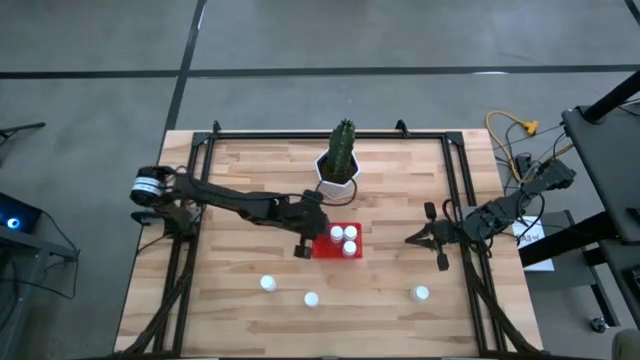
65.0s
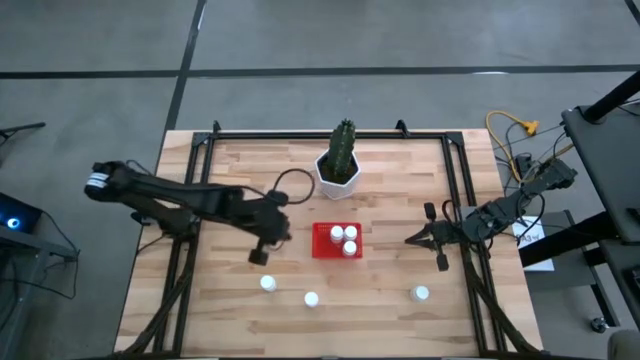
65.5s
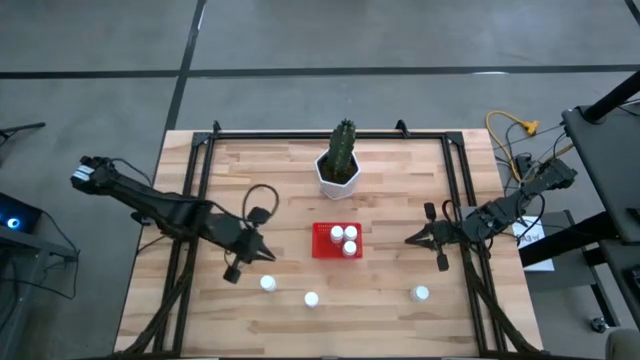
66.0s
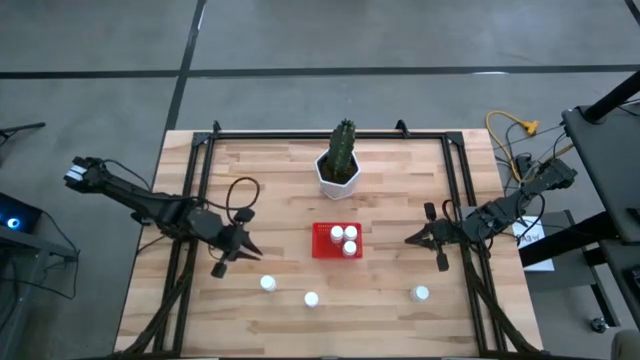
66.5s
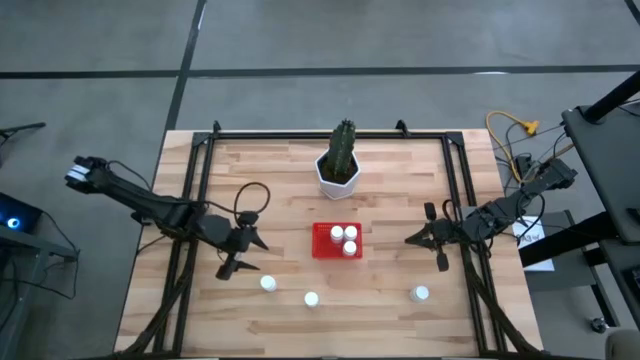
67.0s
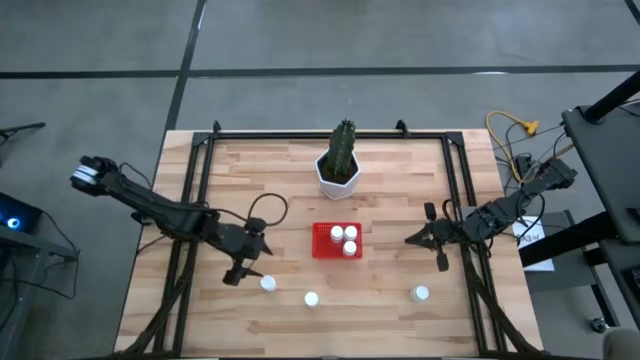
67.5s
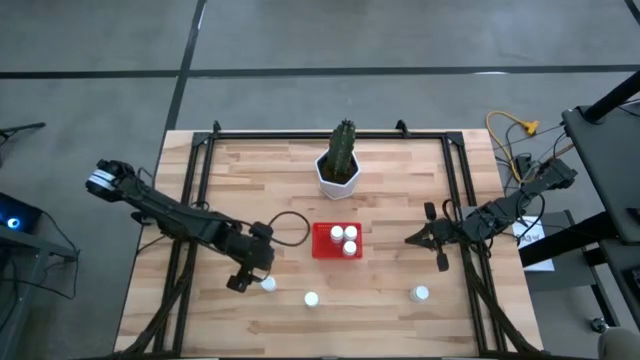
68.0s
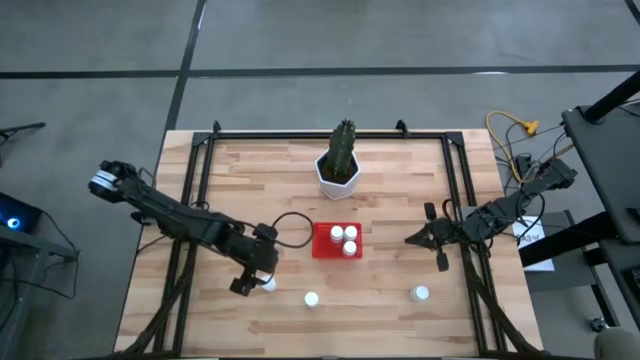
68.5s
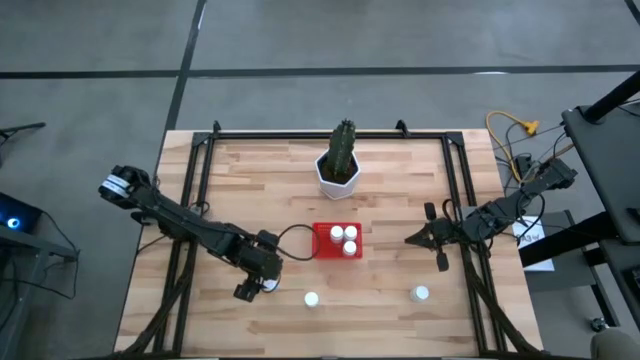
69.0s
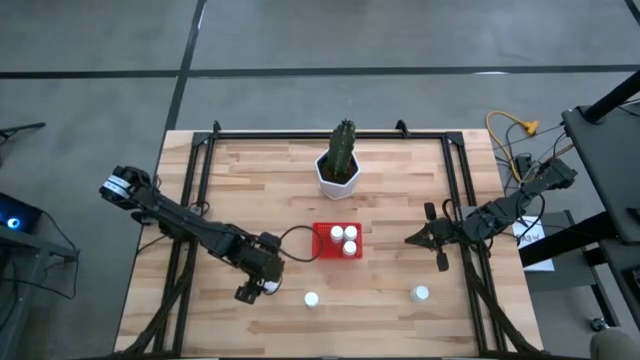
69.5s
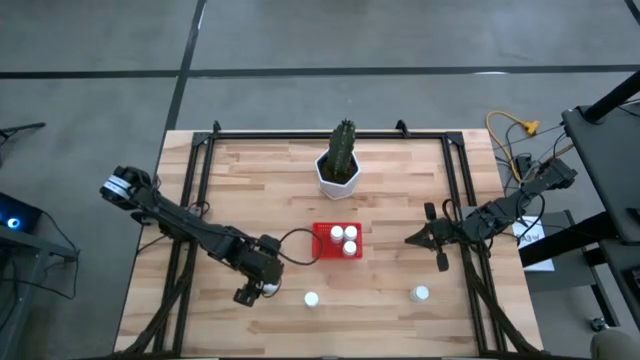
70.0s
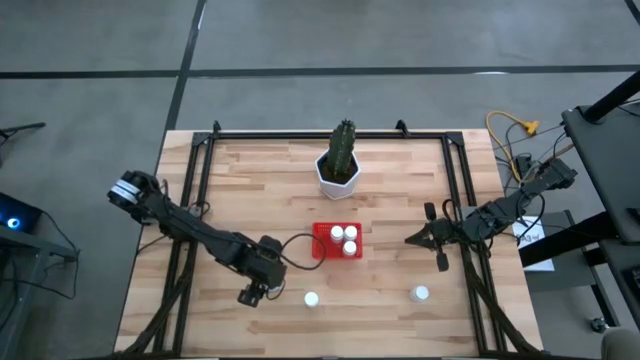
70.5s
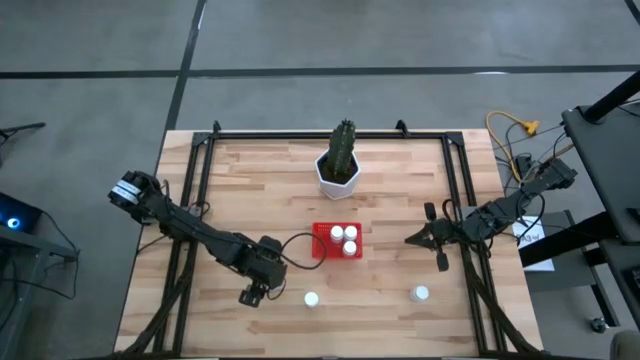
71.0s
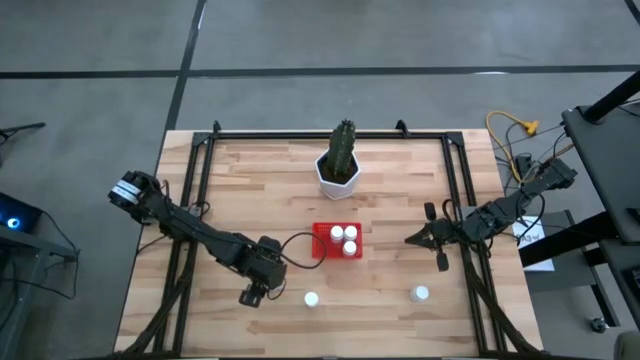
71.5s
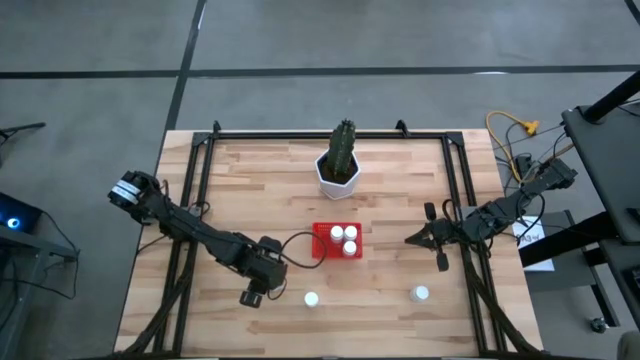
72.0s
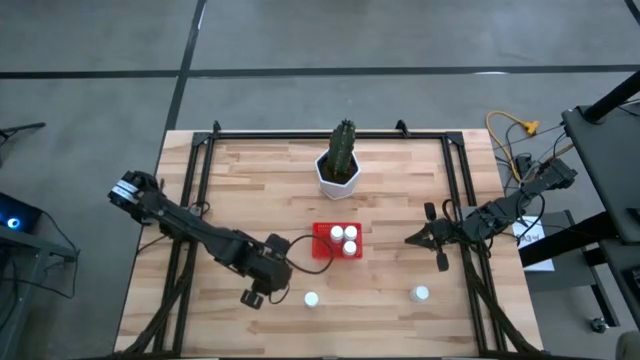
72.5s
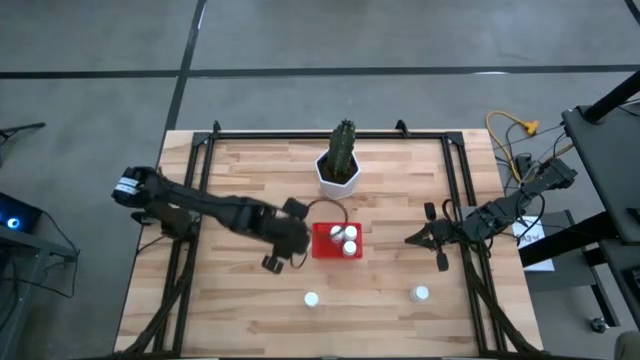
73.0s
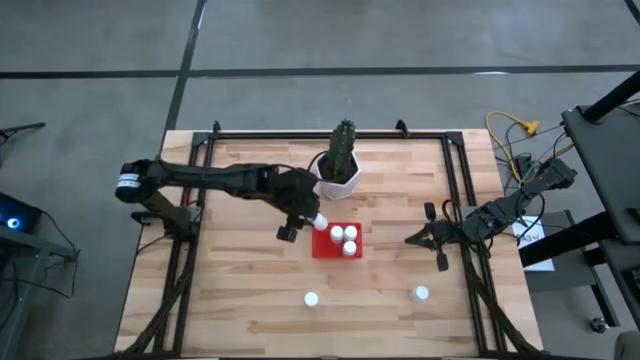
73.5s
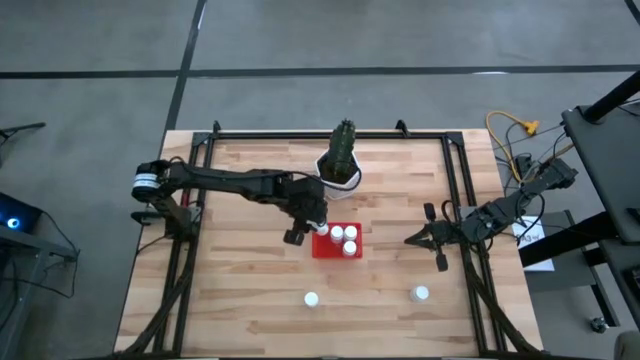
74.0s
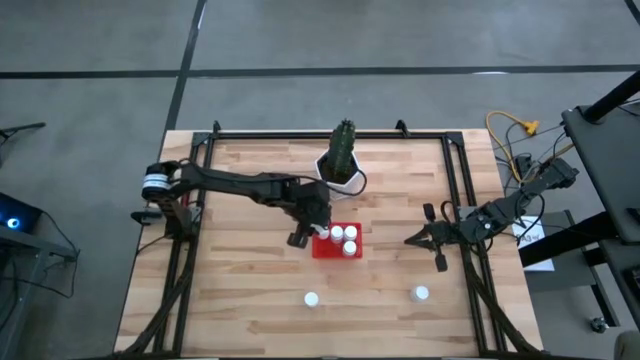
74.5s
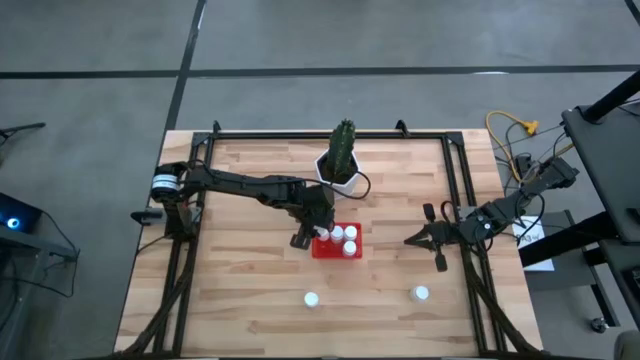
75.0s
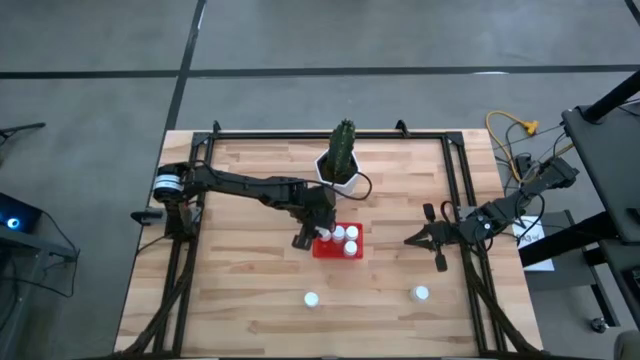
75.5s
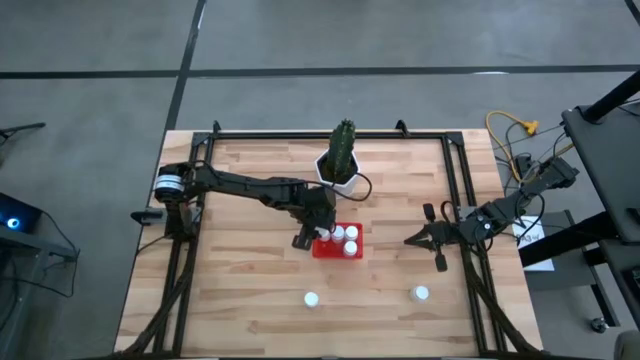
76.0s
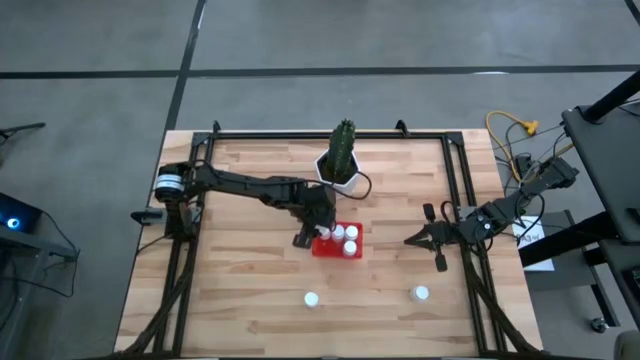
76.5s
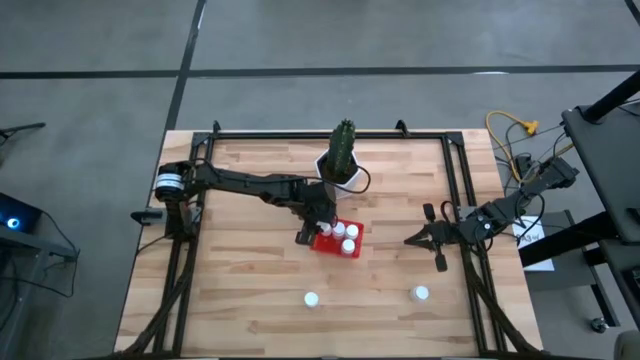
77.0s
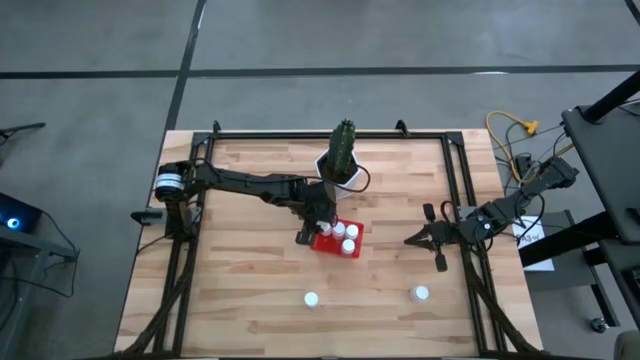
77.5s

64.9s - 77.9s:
Task: Pick and place pill bottles into a basket
Put the left white pill bottle into the red bin

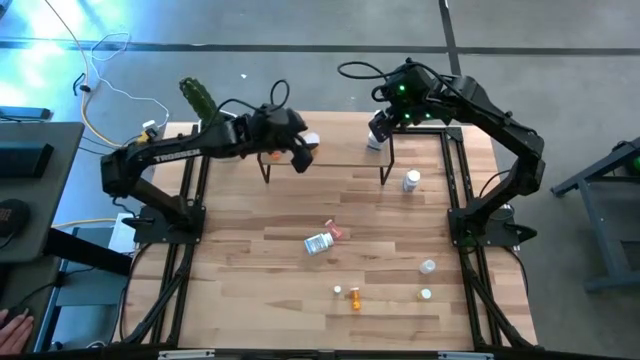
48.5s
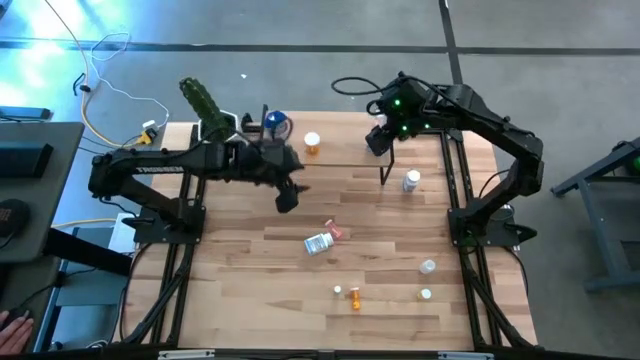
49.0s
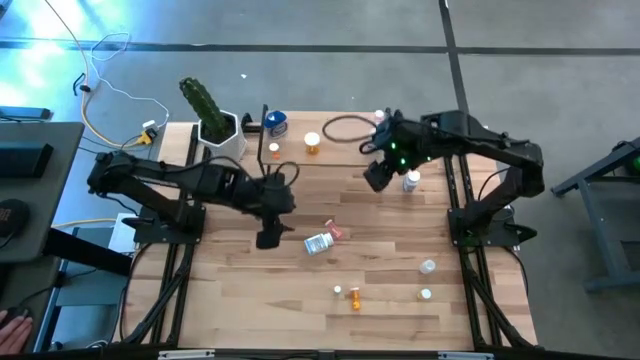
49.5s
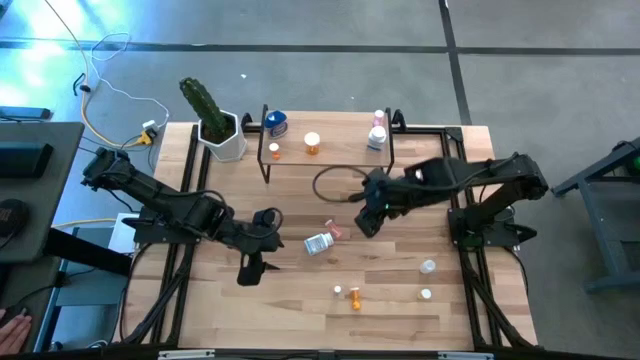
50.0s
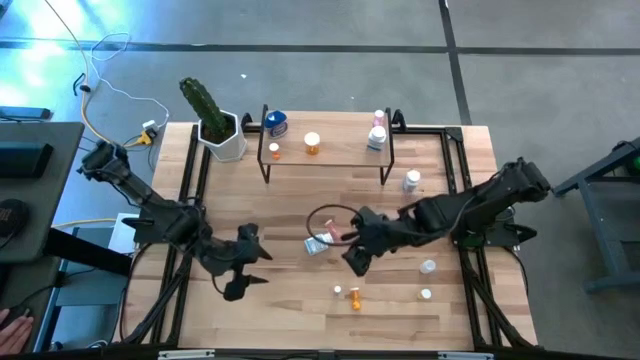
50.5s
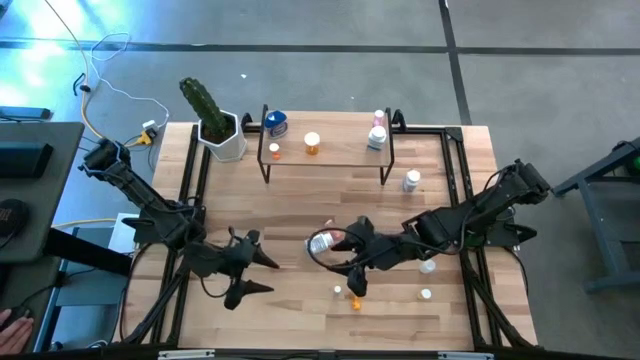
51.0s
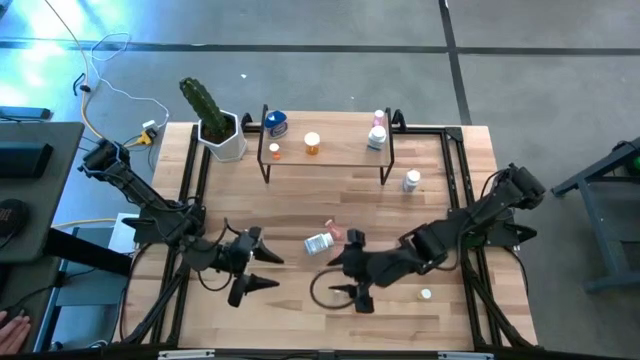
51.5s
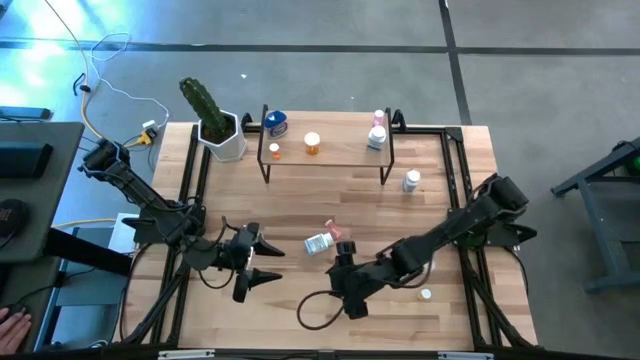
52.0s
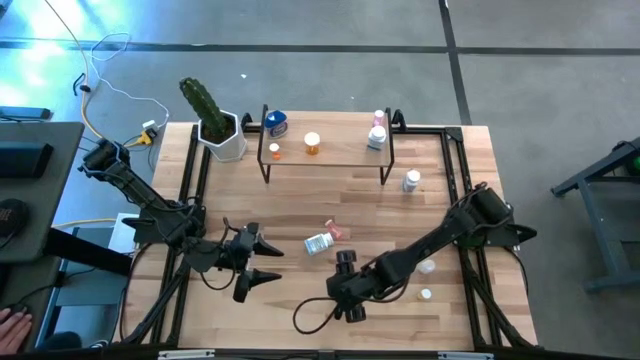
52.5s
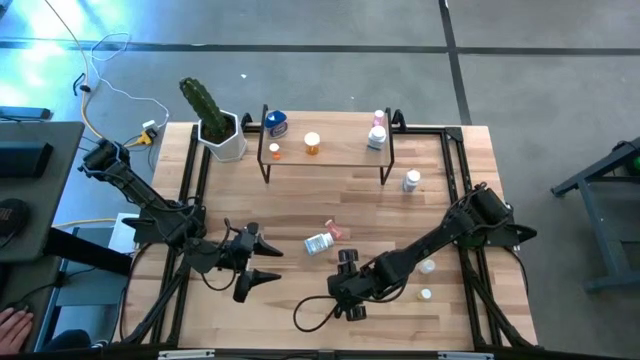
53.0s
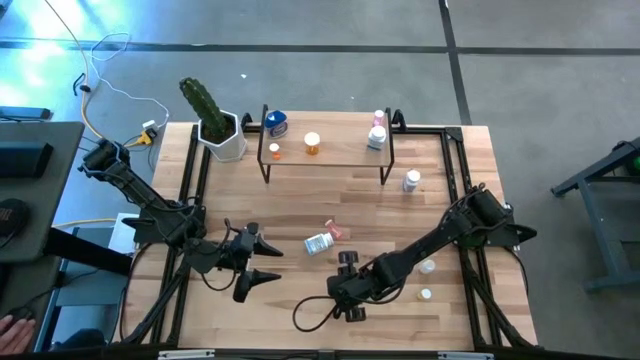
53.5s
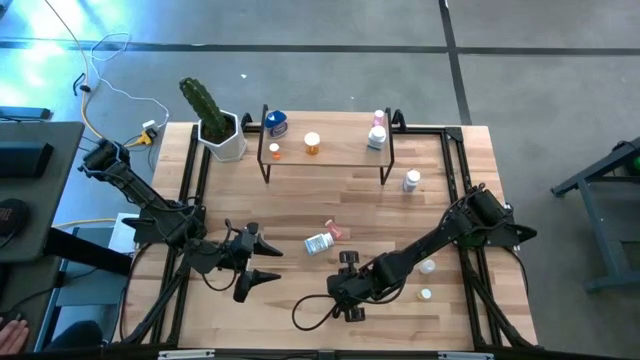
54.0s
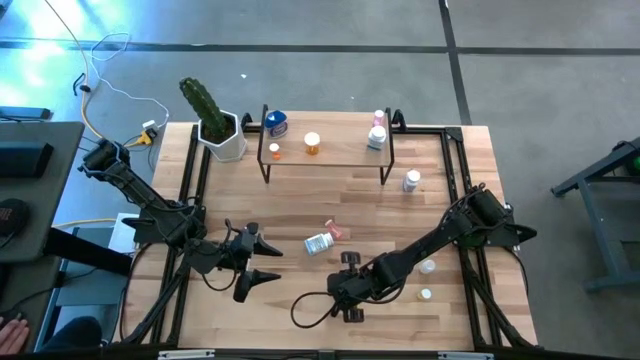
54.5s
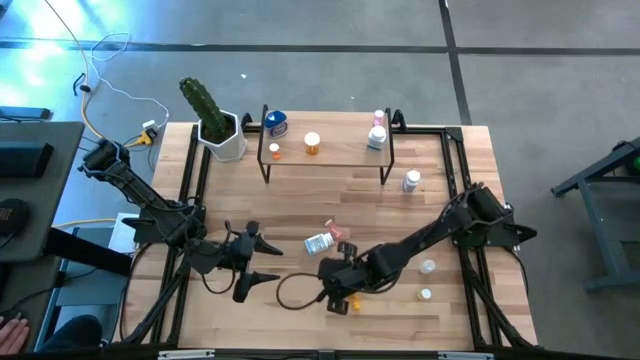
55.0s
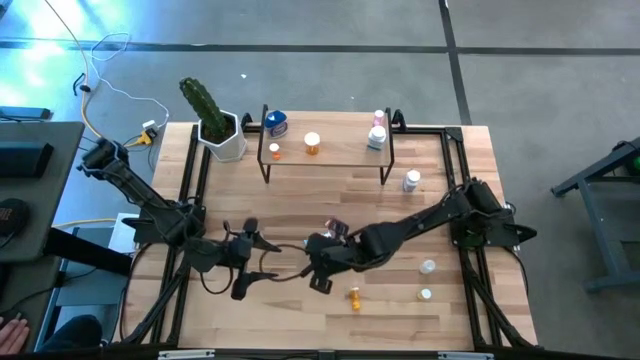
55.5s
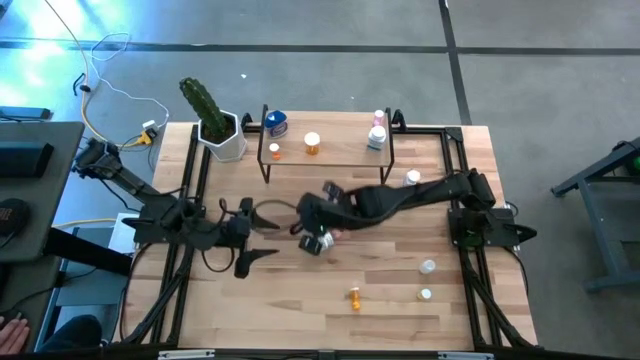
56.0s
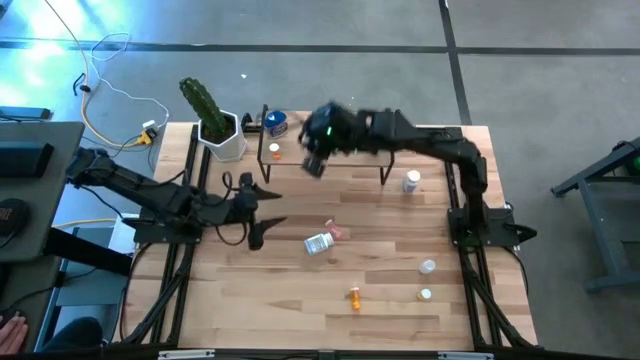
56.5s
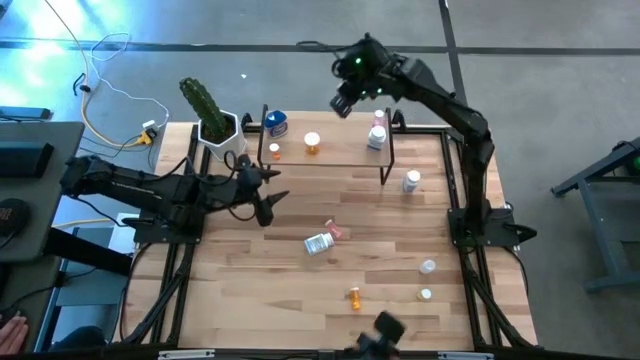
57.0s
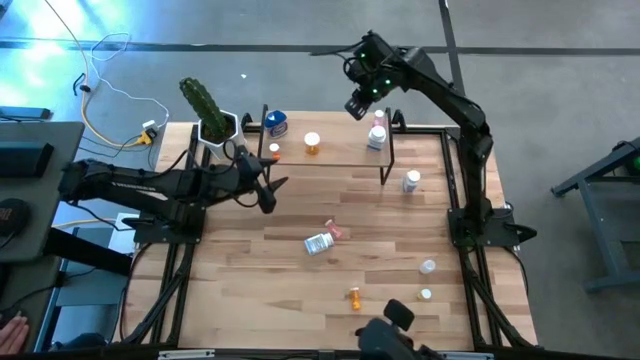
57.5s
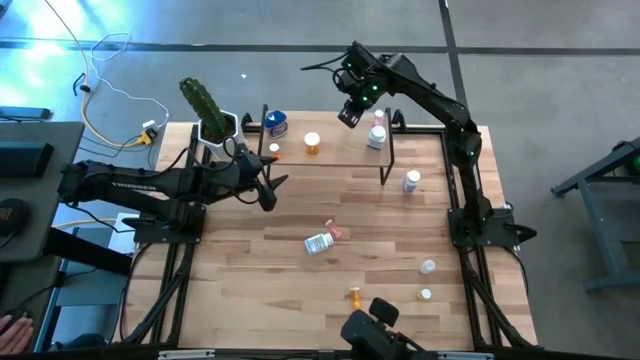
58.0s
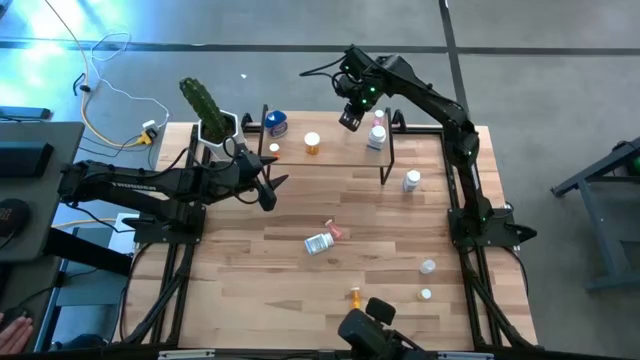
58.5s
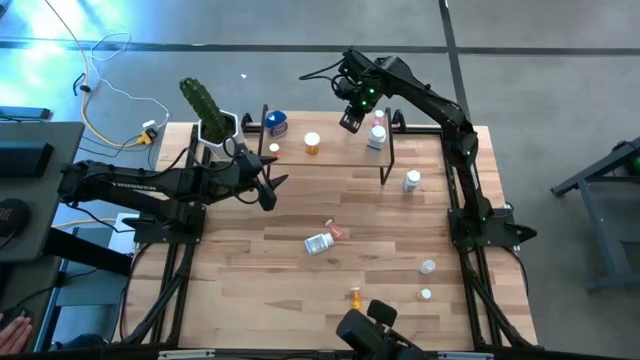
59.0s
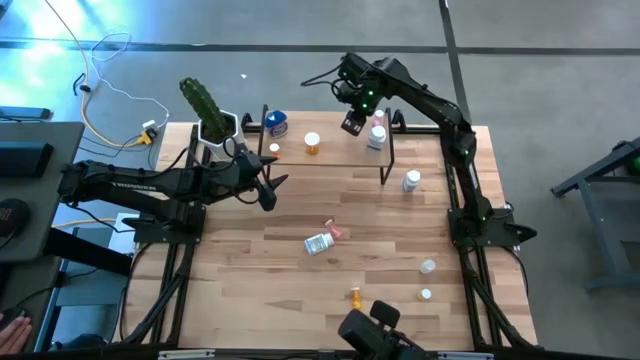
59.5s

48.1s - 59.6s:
Task: Pick and place medicine bottles onto shelf by color
Put the small white pill bottle on the shelf
